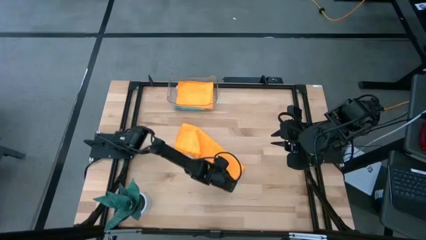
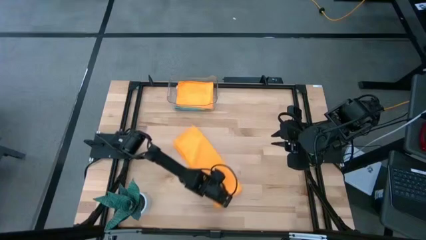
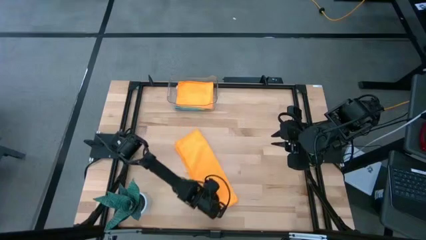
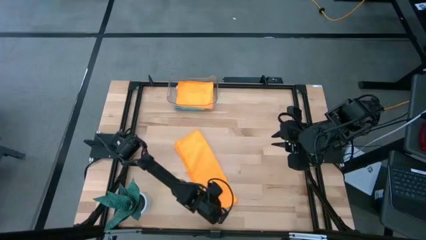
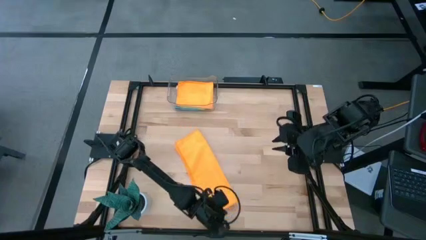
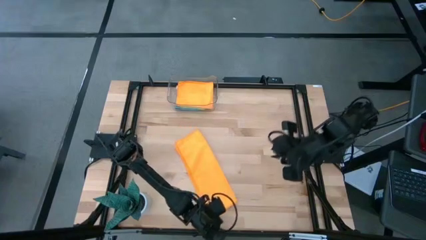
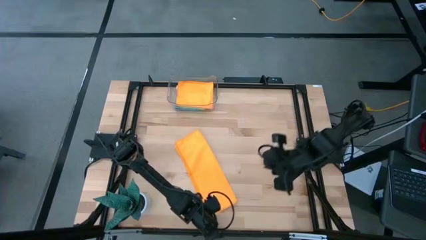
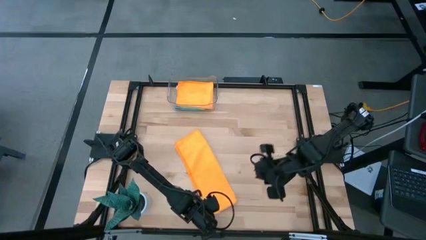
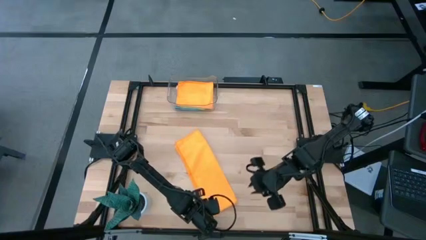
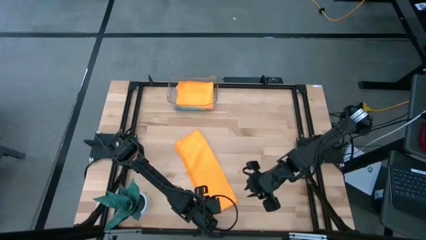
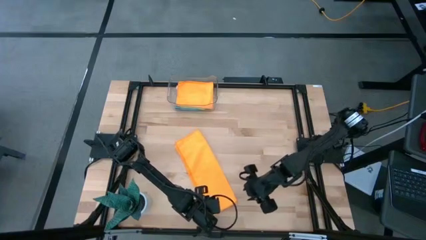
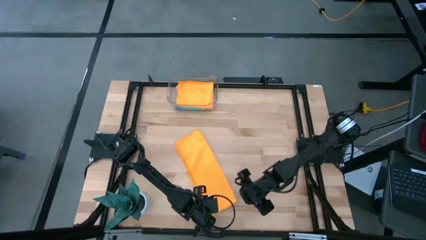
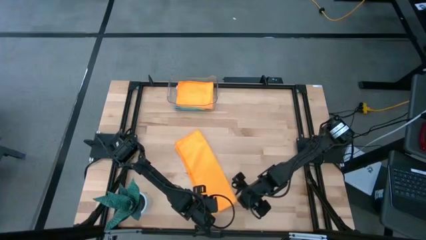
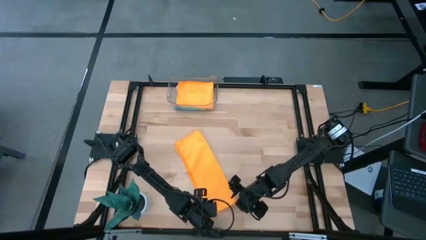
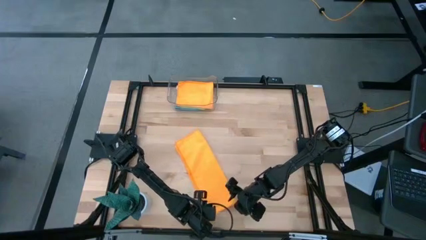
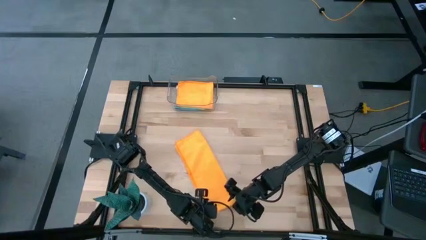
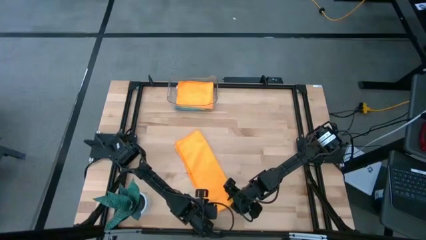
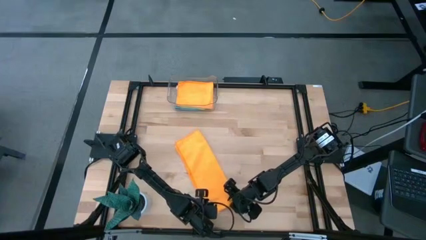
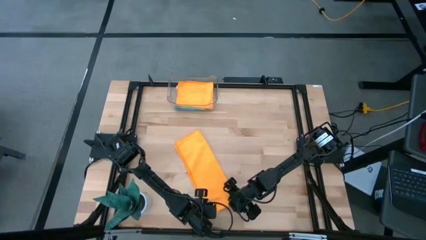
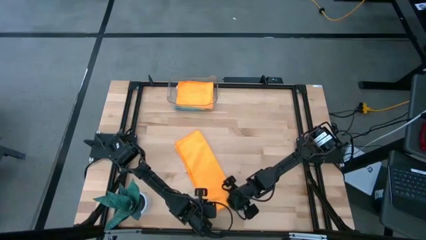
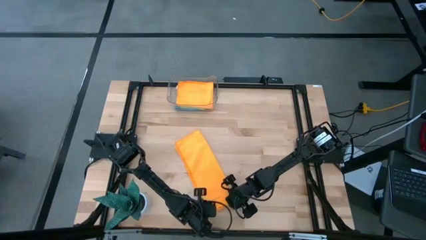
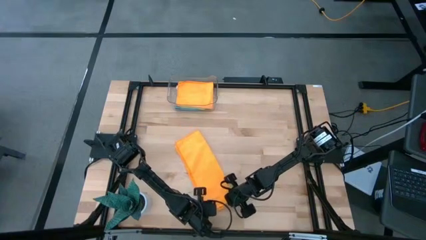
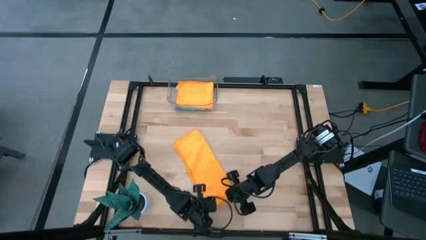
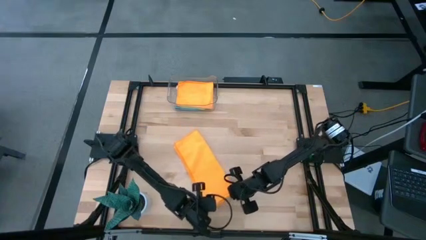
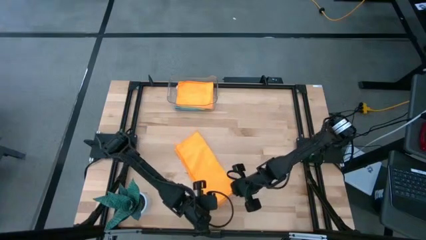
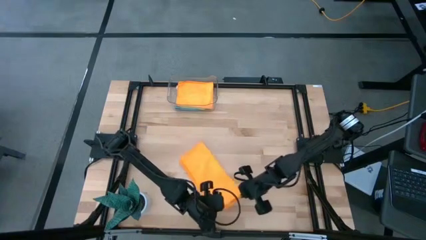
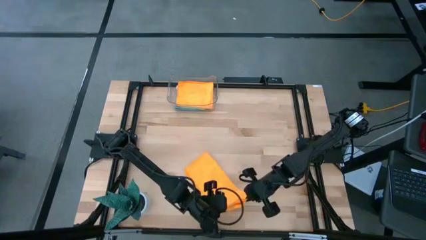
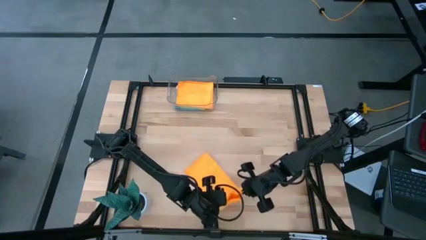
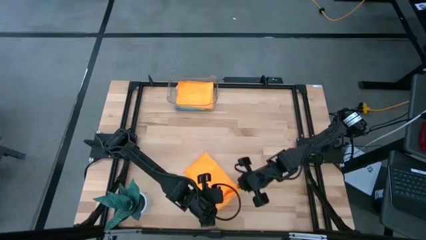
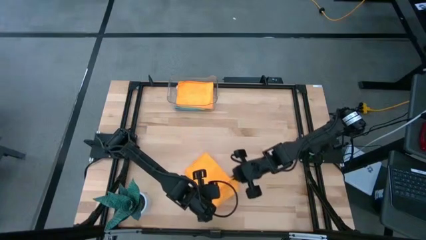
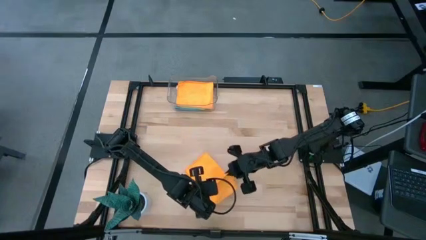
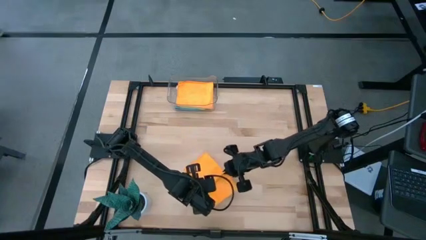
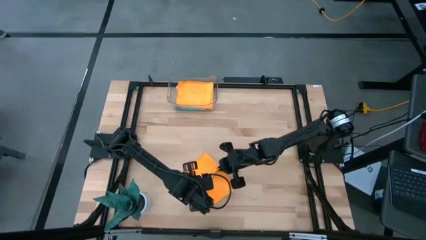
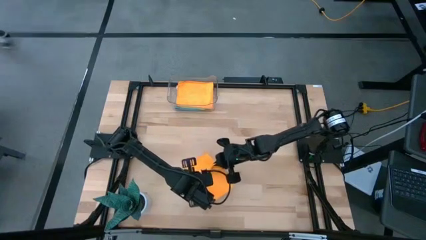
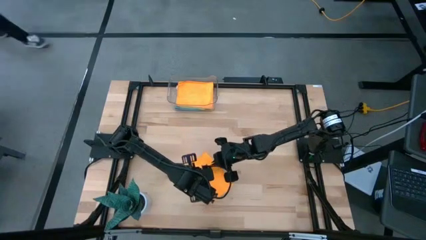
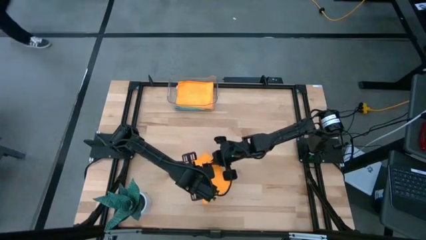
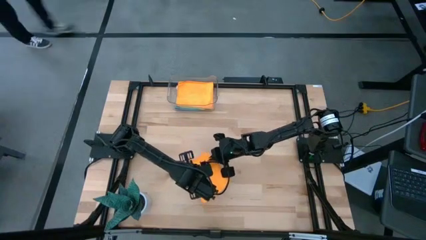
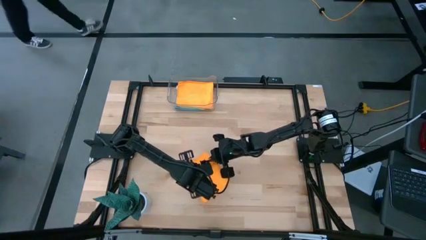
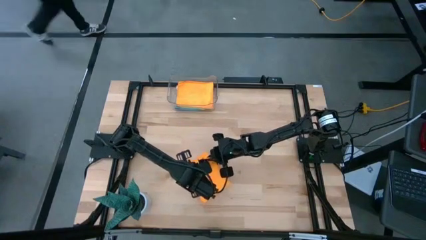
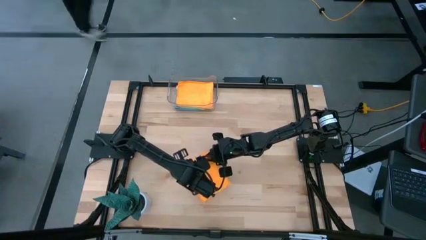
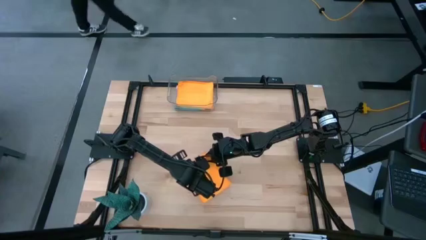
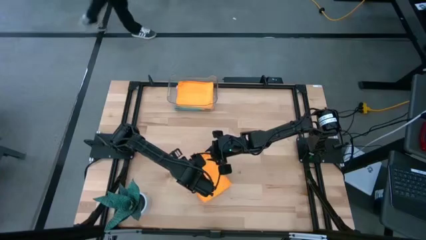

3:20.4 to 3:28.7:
Task: Fold microfiber towels
Fold the orange microfiber cloth

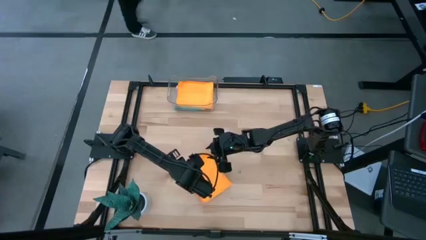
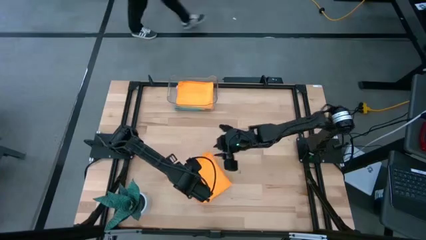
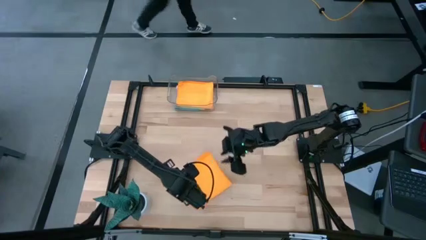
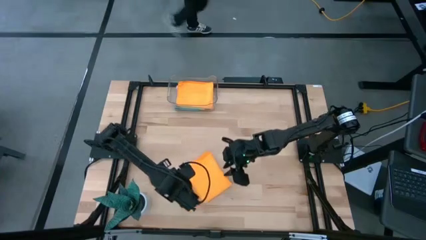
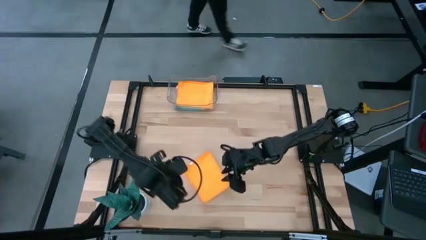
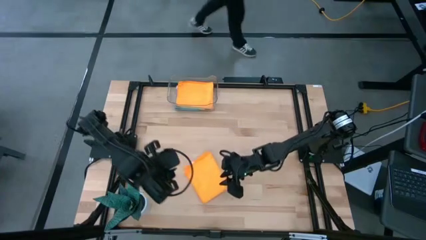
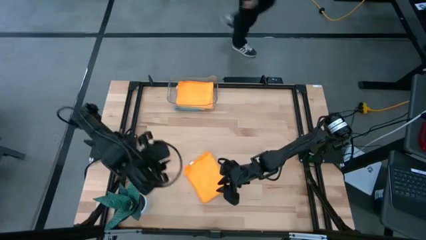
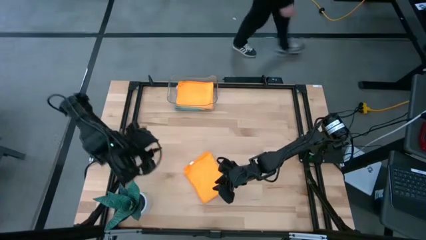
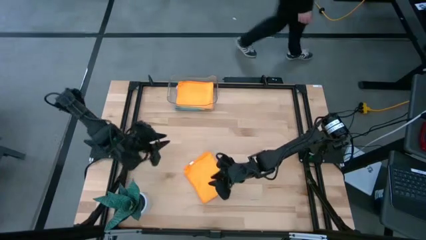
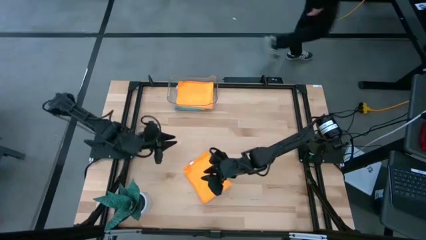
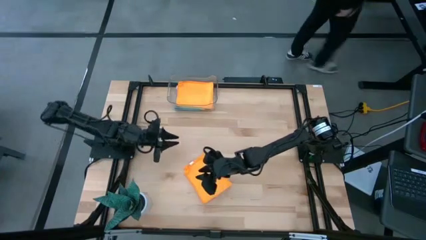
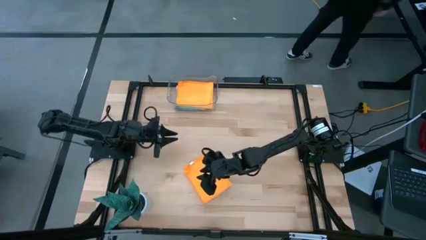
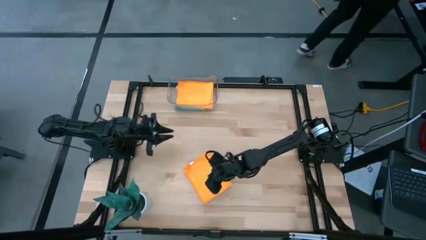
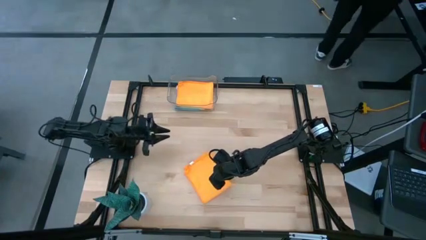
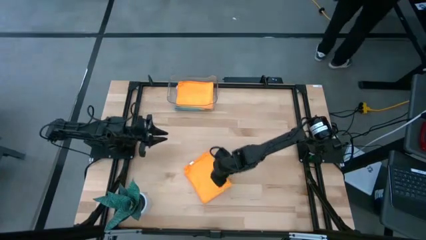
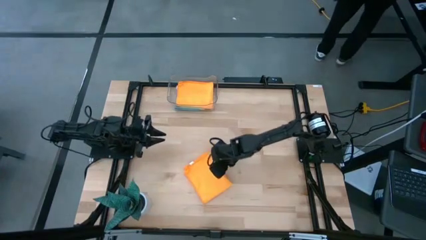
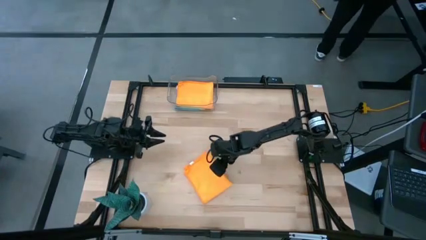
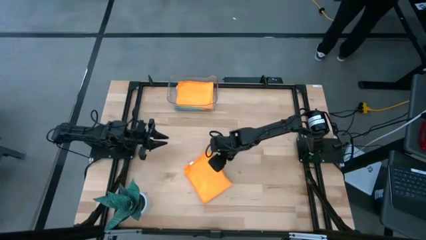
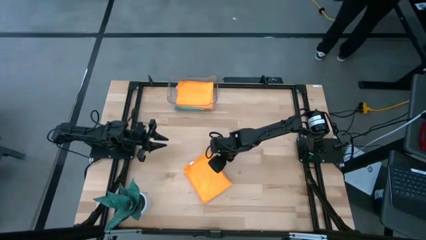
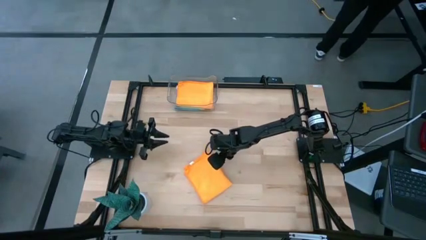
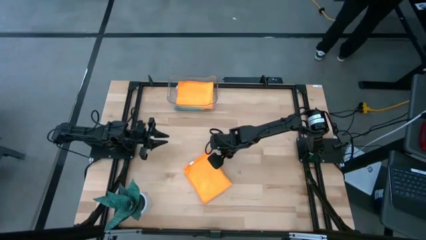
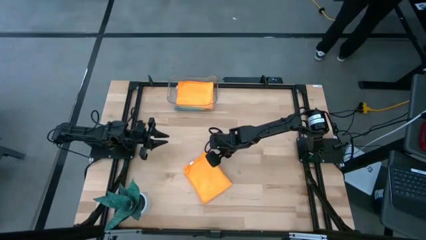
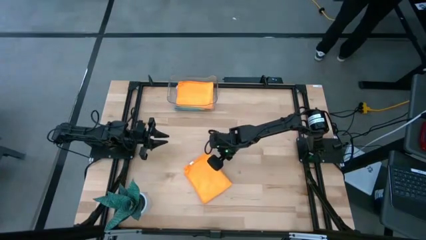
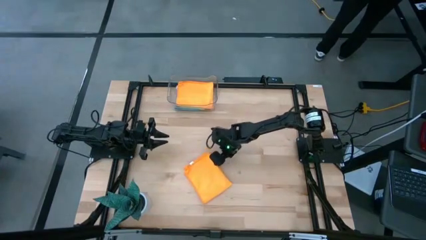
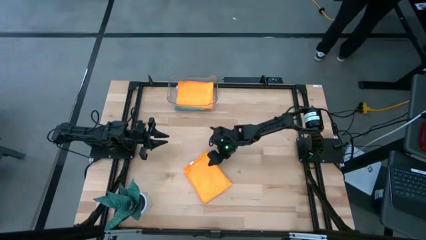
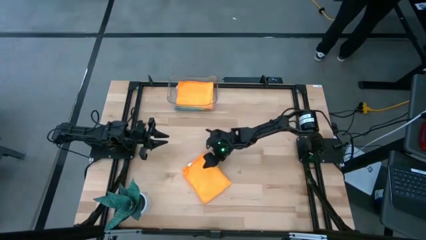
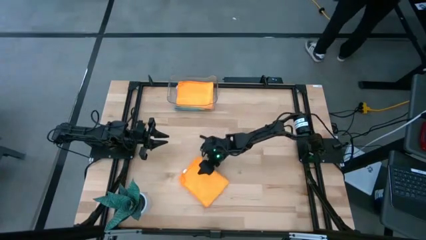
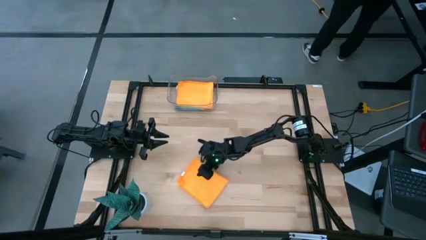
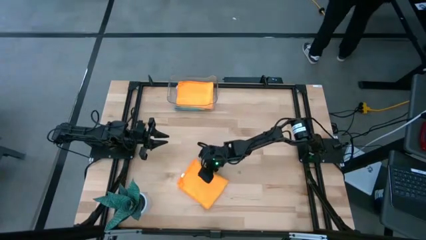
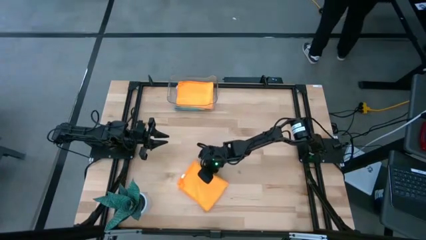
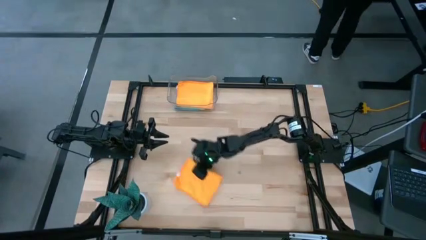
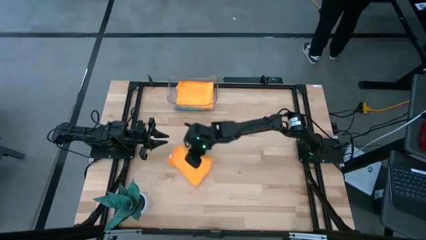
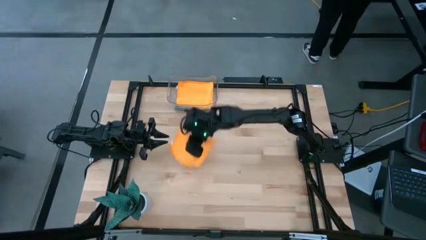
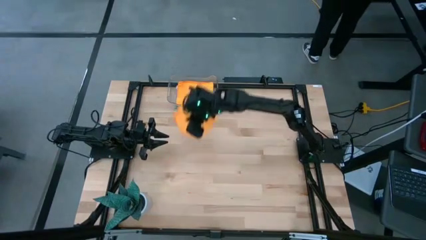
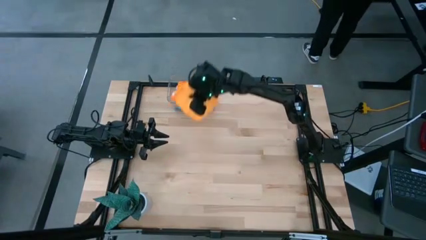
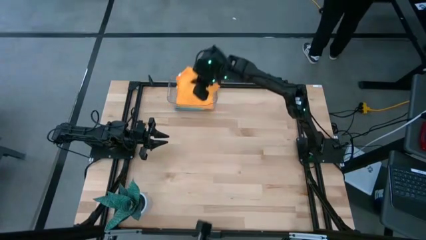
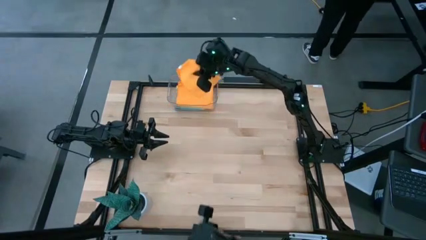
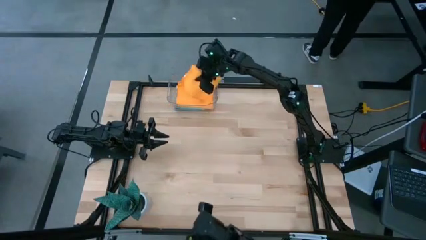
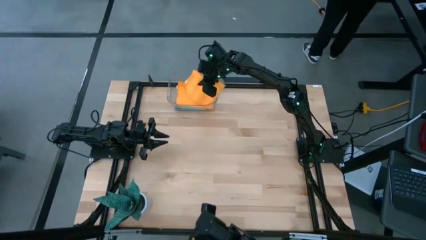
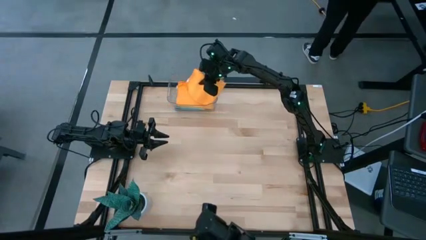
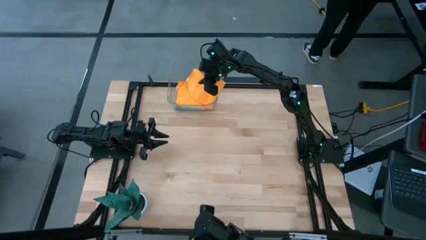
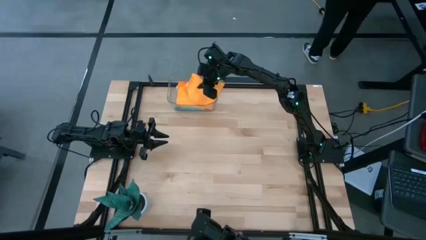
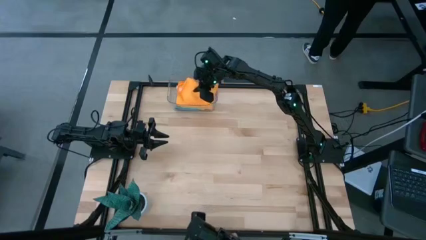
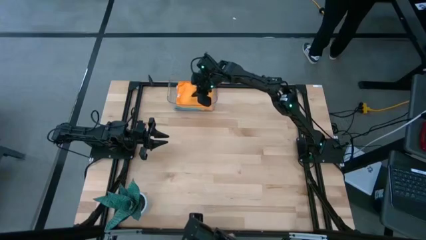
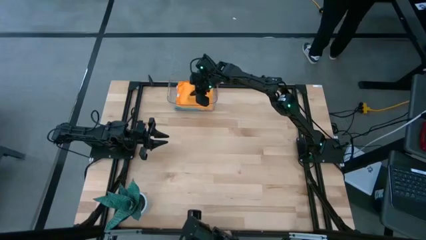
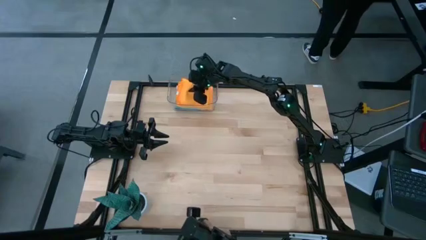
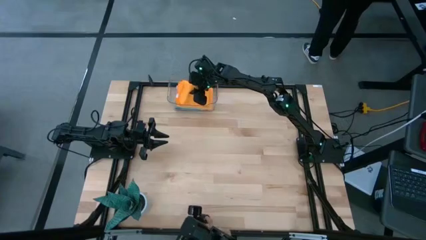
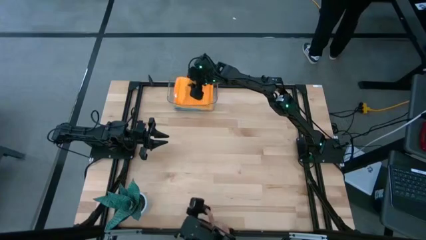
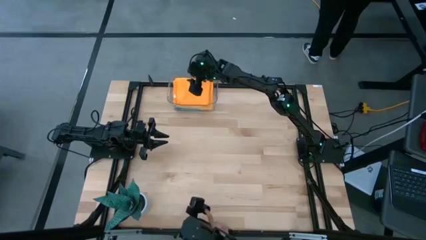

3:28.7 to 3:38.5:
Stack the folded orange microfiber cloth on top of the orange microfiber cloth
